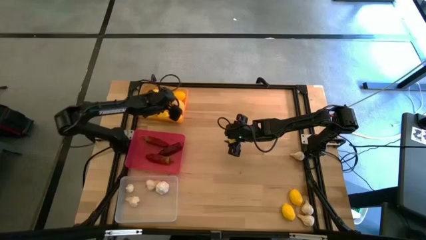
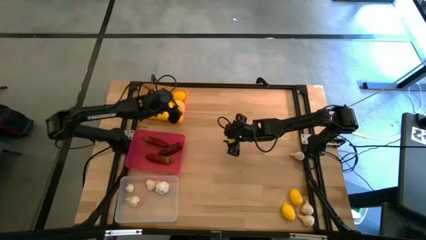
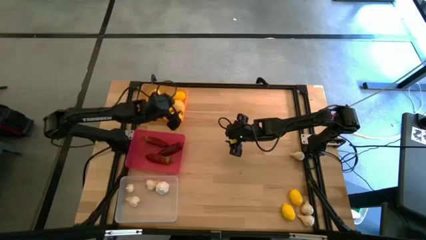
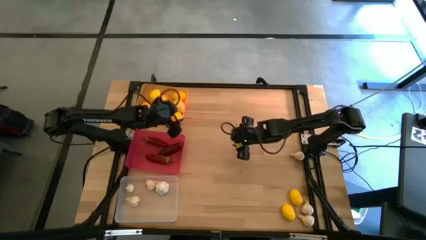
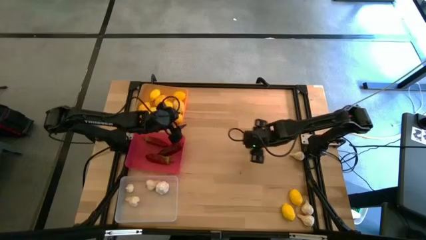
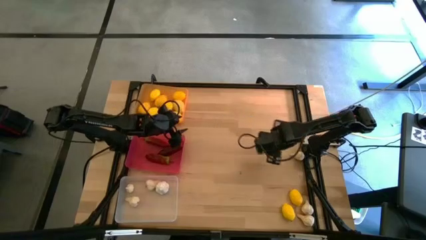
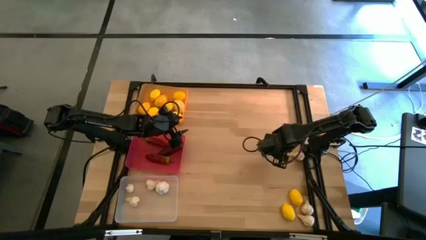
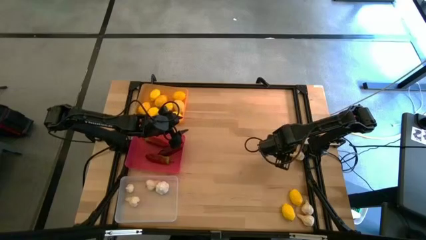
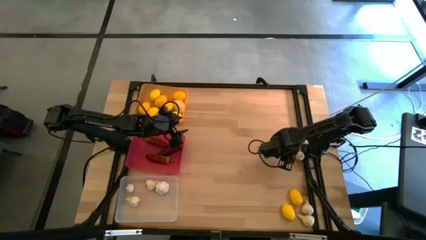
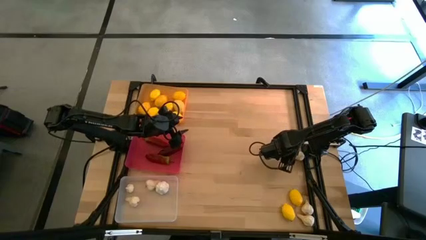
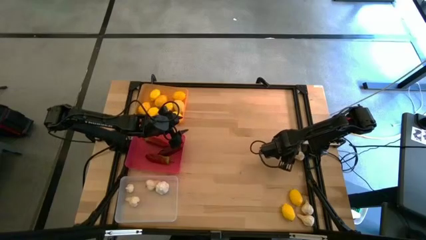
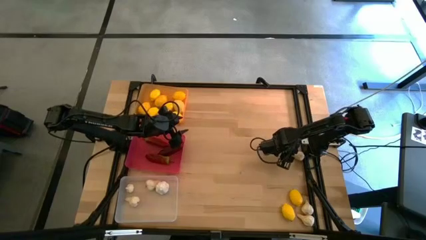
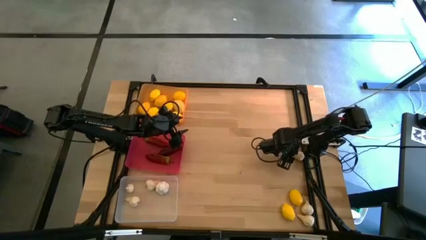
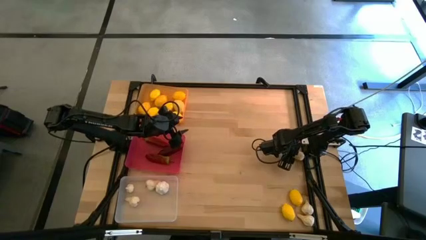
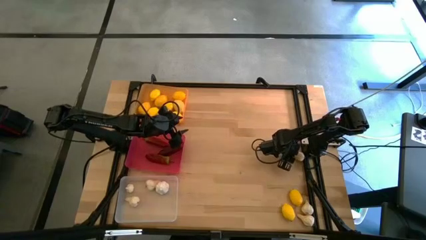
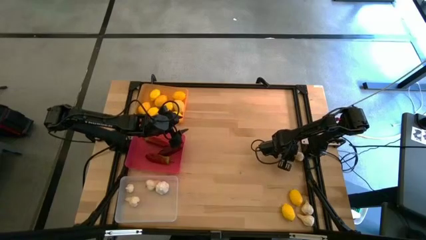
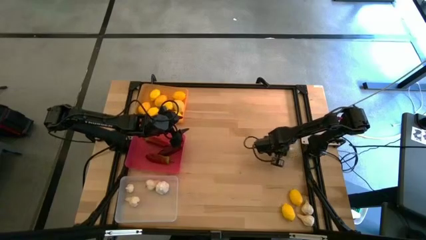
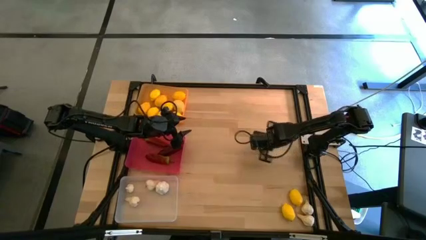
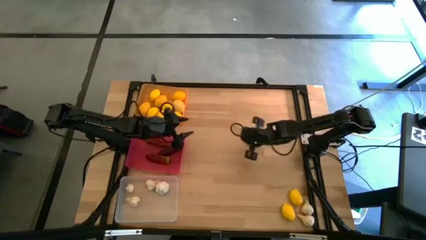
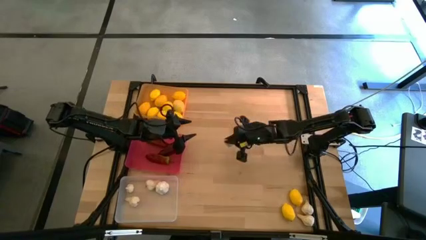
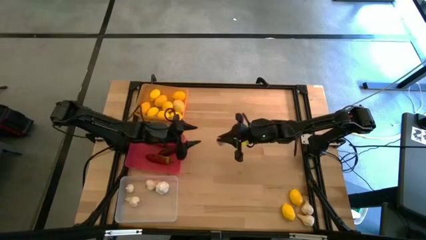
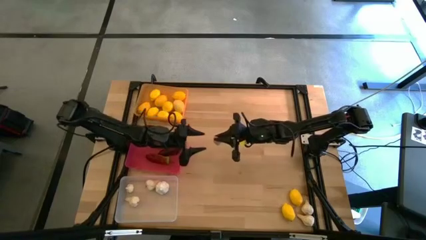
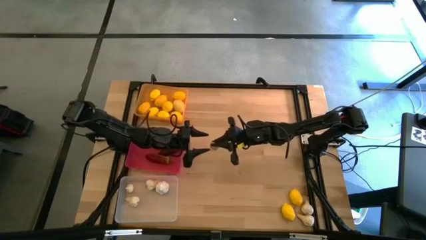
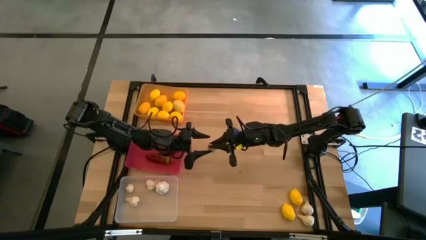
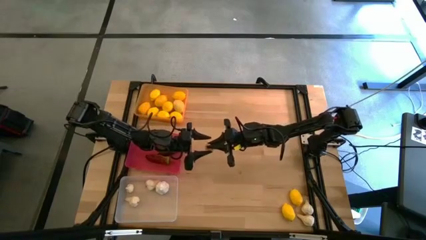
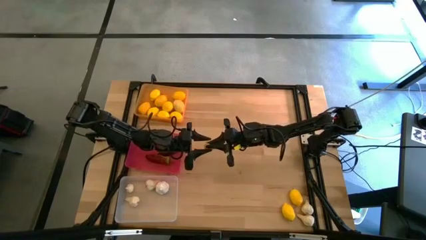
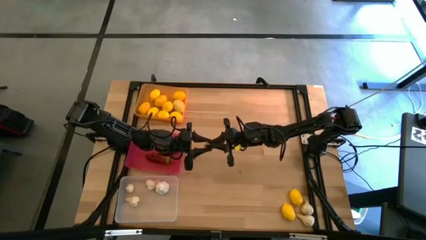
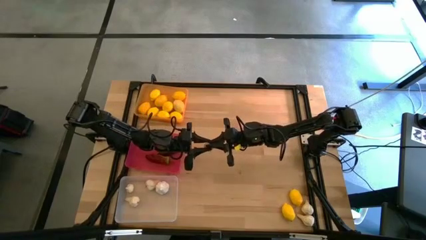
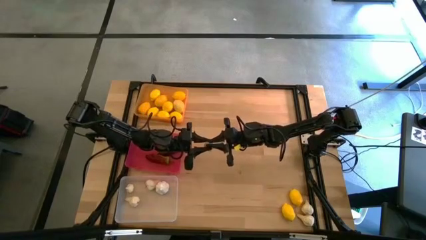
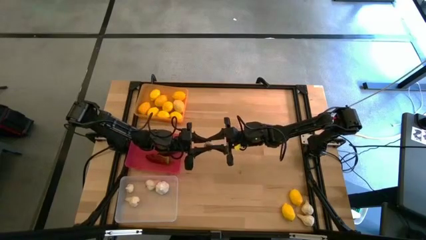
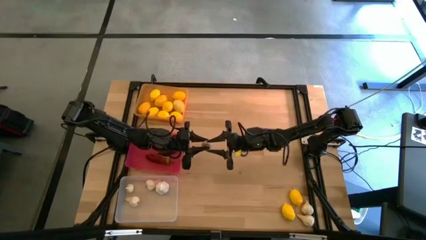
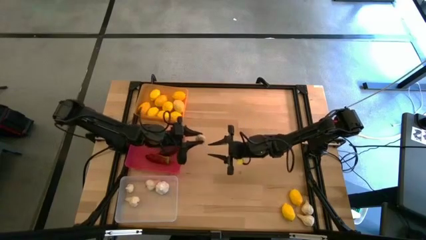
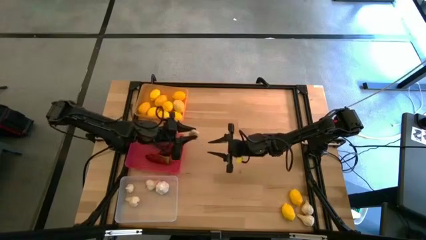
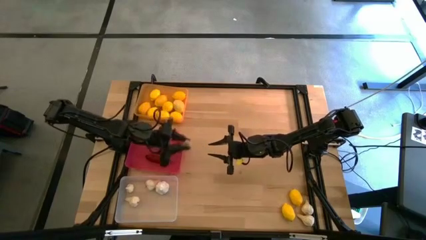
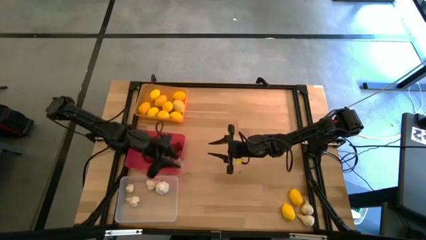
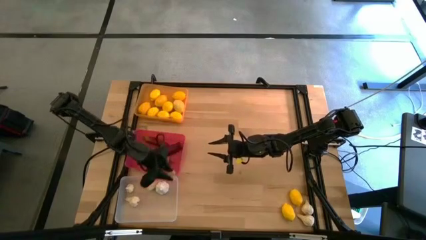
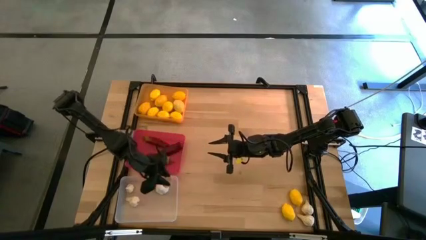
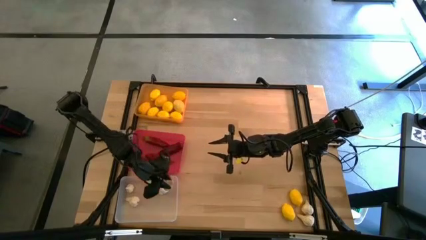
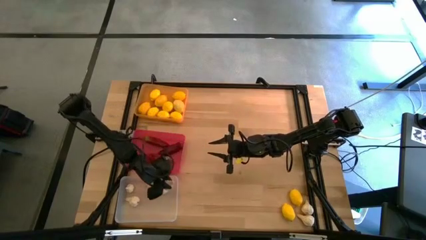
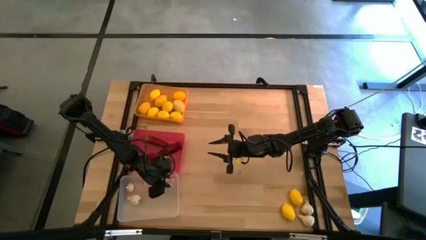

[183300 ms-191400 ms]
Task: Sort produce into baskets
Put the garlic into the transparent bin

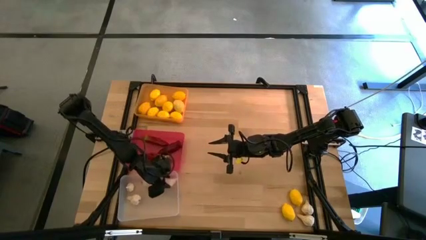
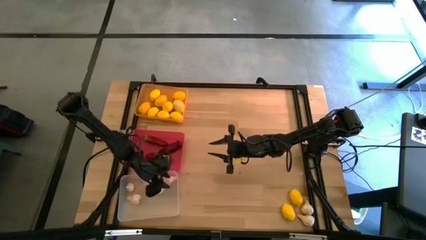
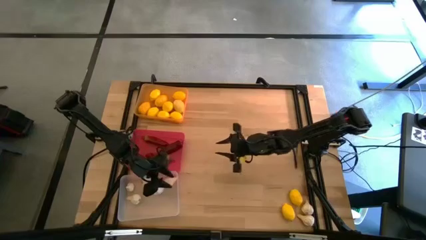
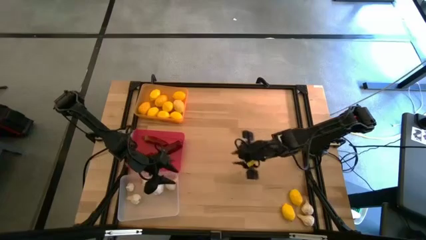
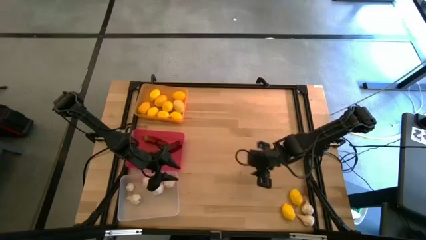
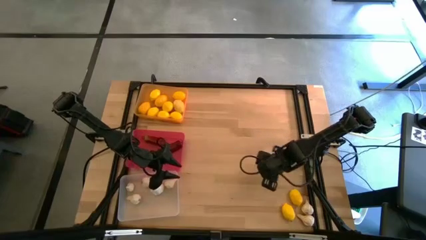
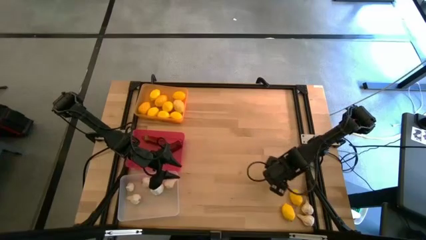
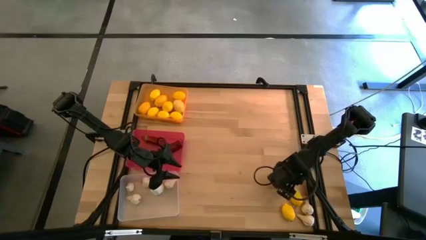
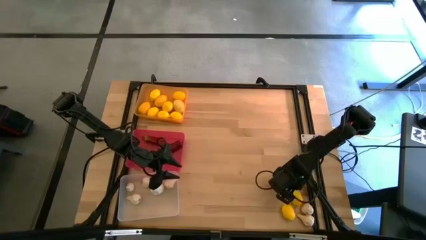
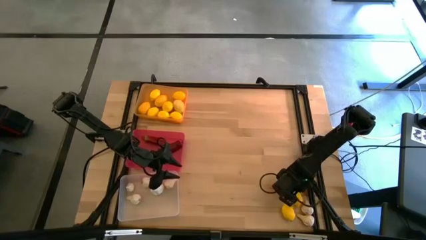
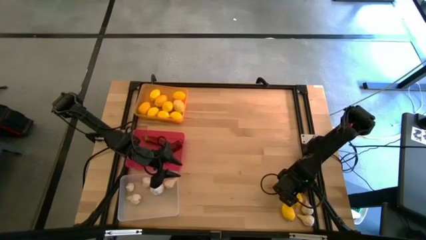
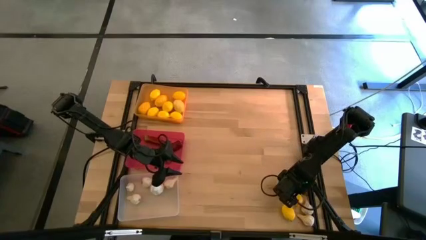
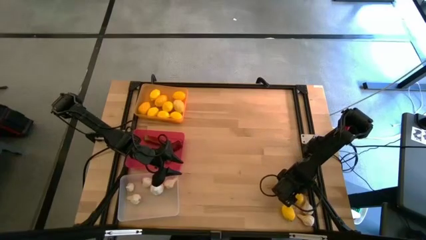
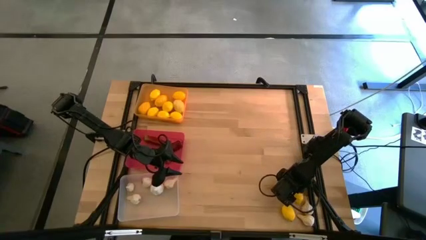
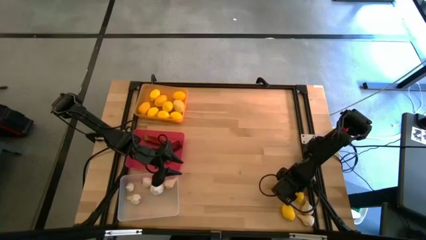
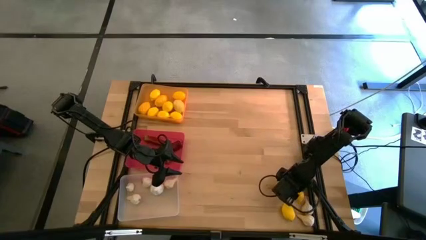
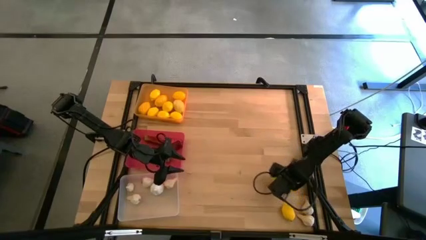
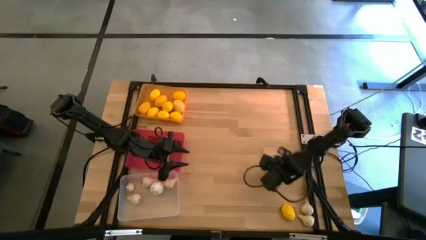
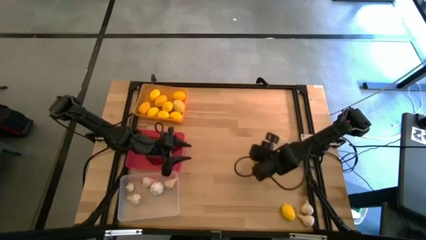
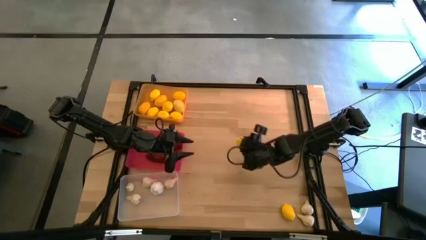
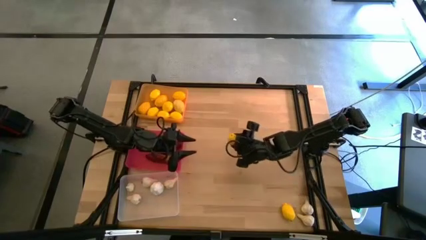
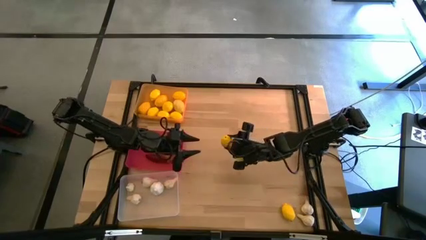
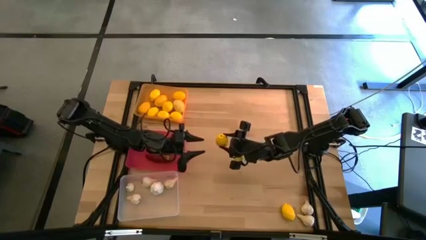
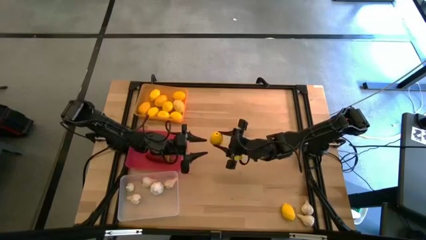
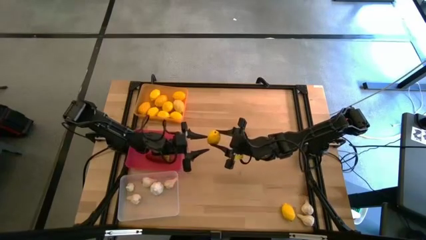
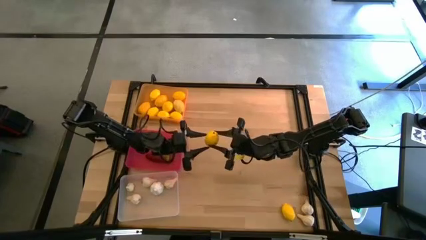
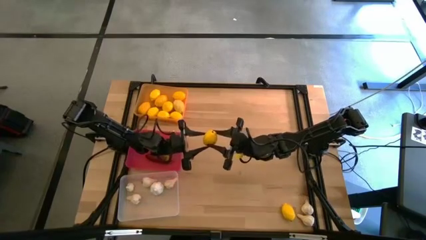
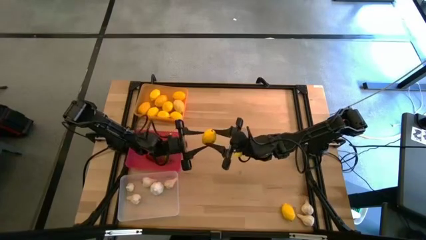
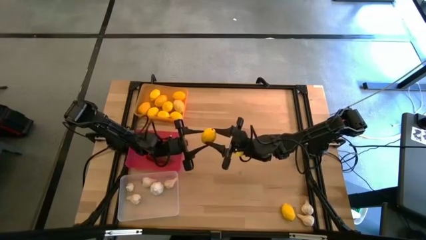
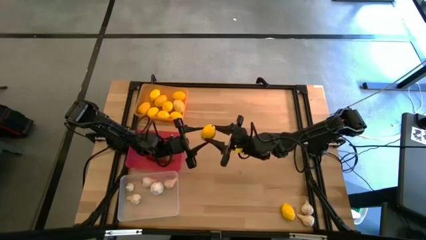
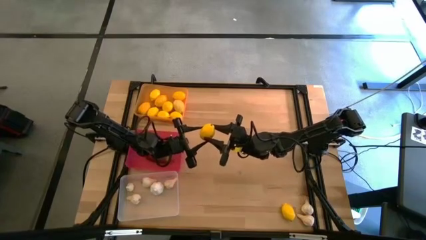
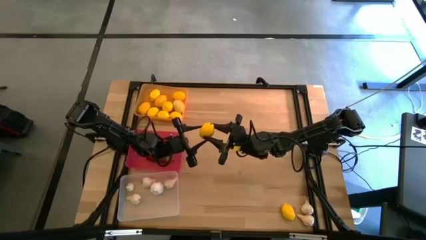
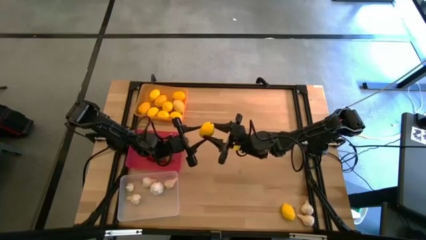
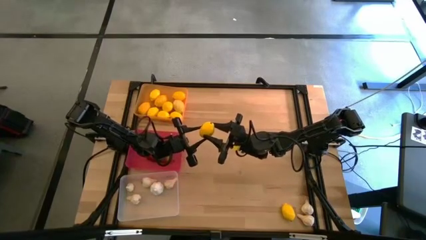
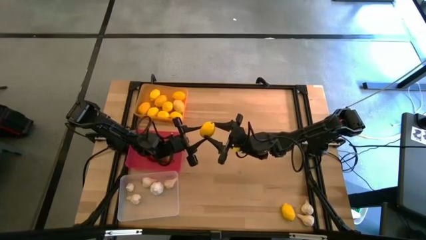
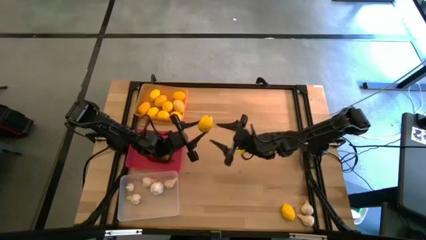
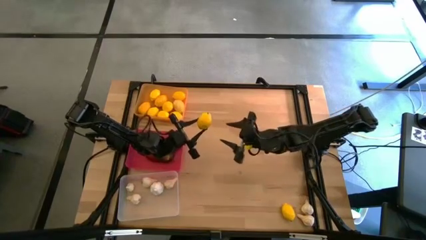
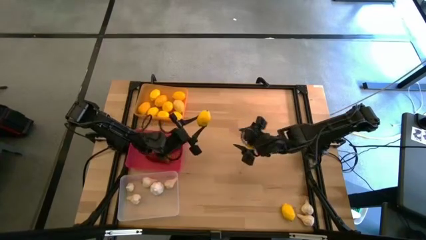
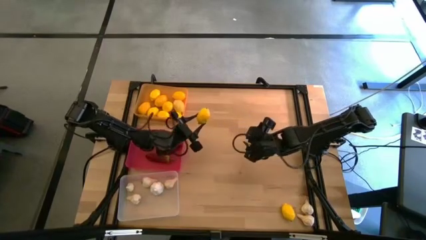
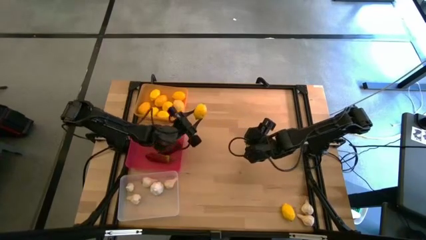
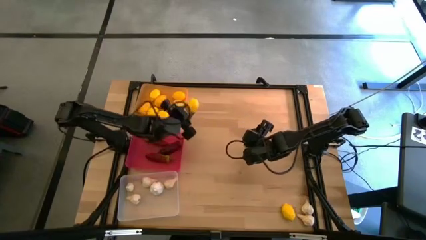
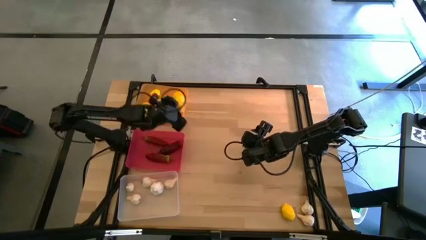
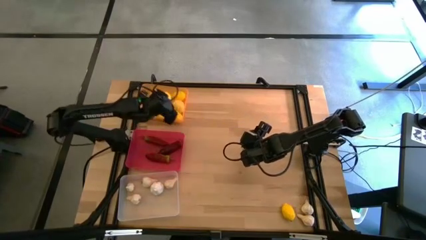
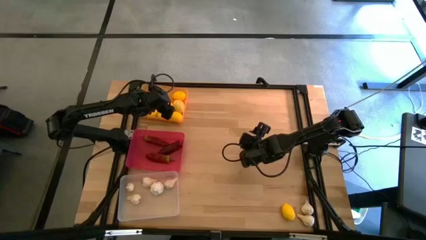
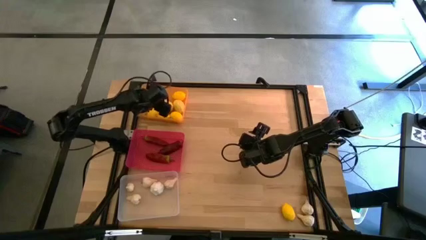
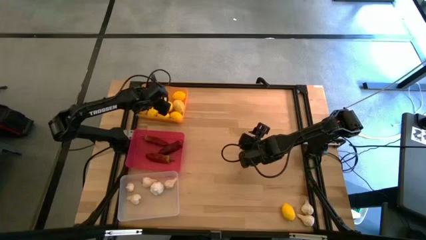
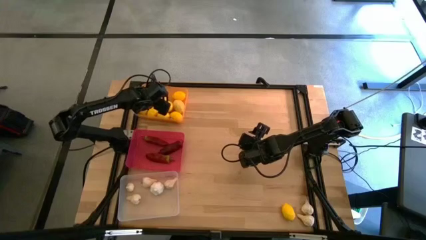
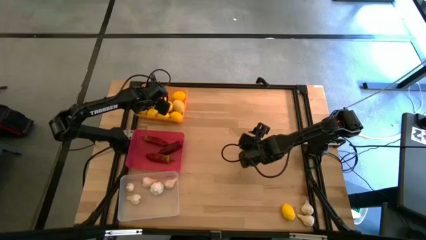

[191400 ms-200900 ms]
Put the lemon into the yellow bin
